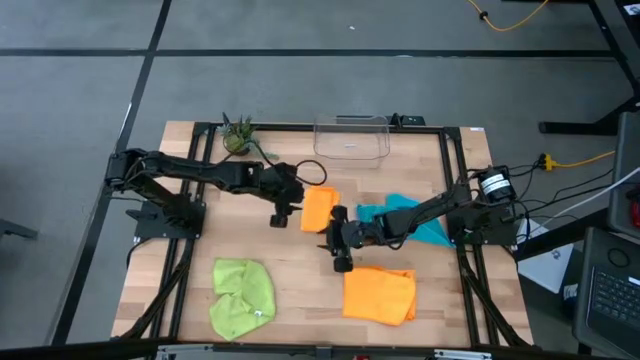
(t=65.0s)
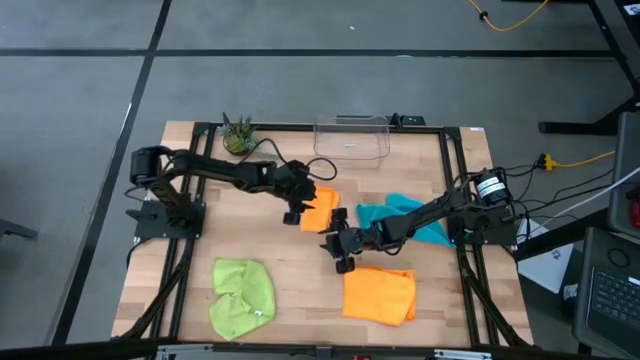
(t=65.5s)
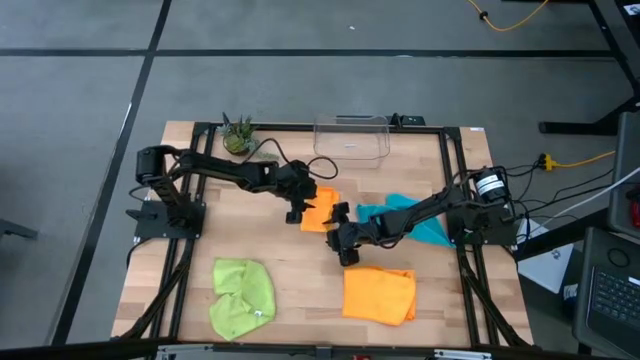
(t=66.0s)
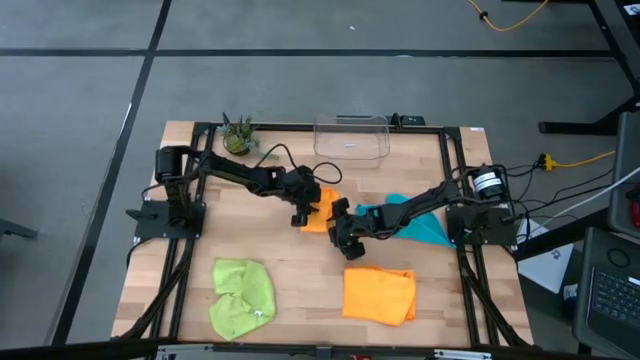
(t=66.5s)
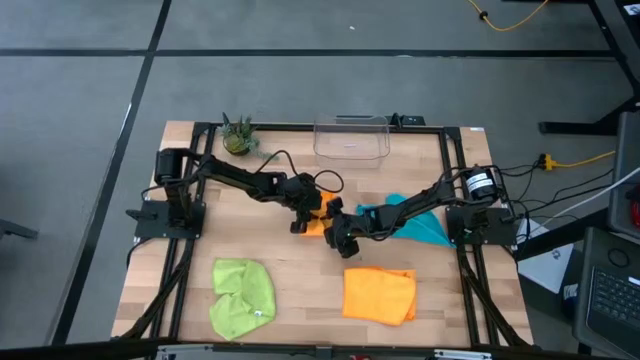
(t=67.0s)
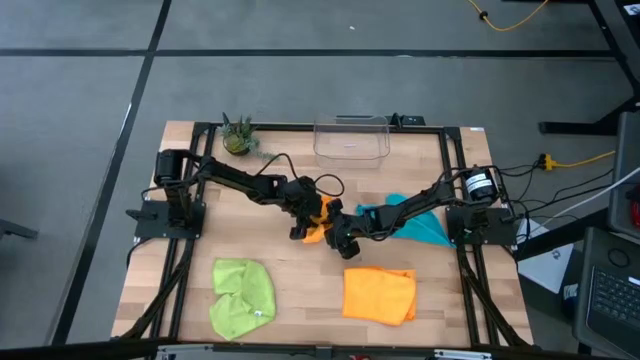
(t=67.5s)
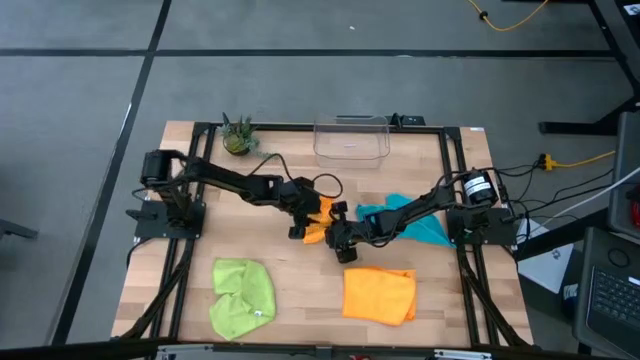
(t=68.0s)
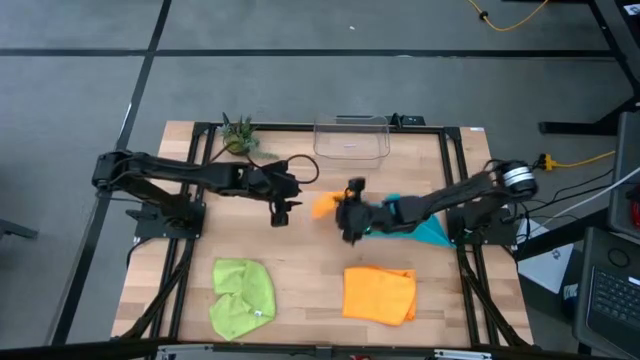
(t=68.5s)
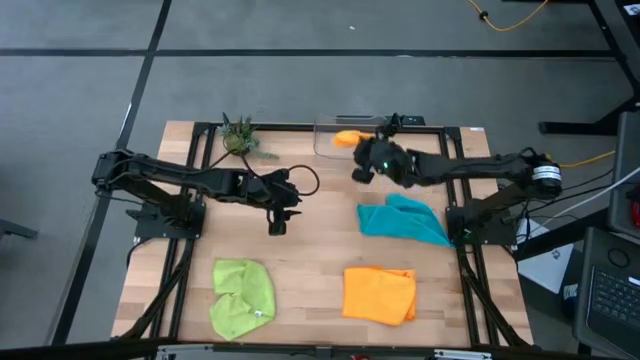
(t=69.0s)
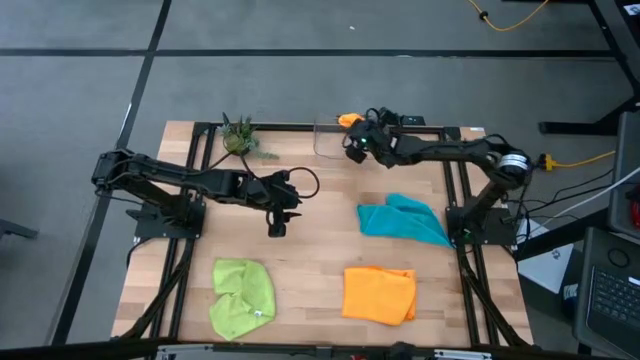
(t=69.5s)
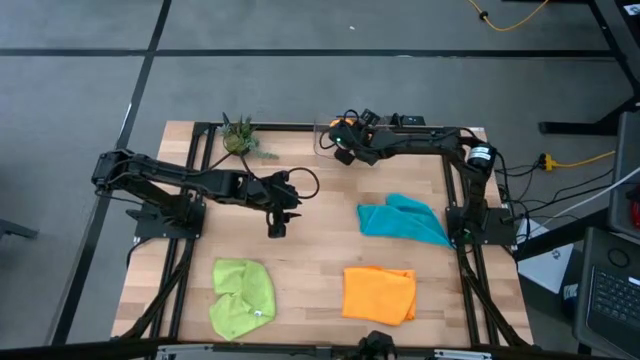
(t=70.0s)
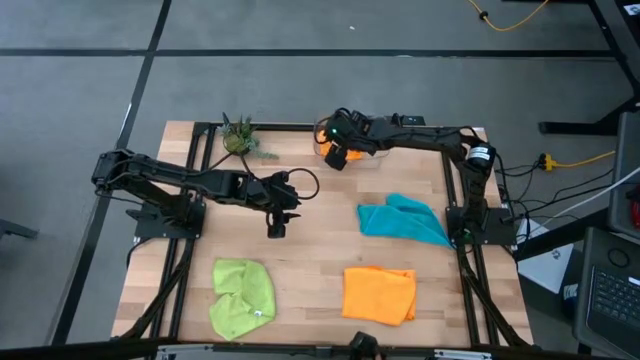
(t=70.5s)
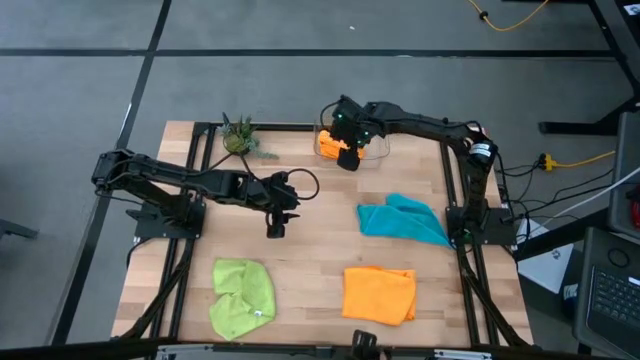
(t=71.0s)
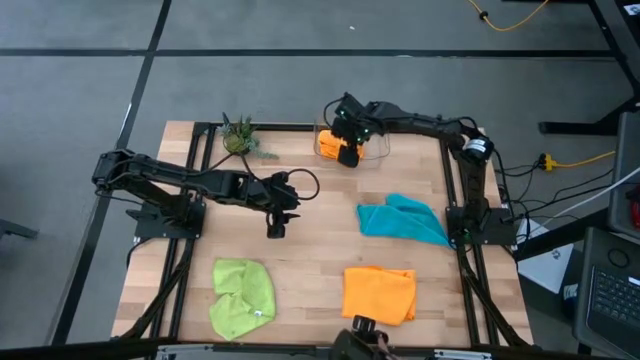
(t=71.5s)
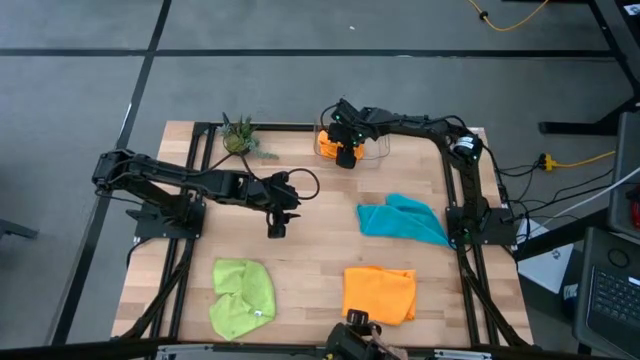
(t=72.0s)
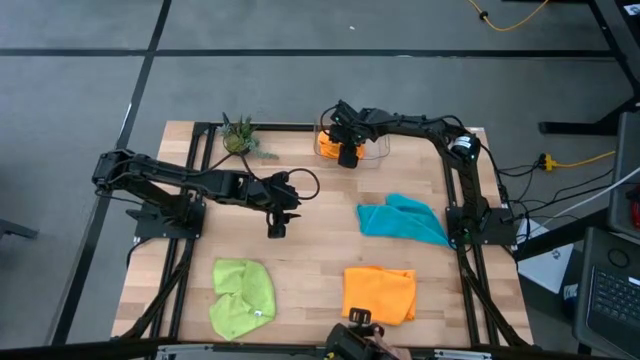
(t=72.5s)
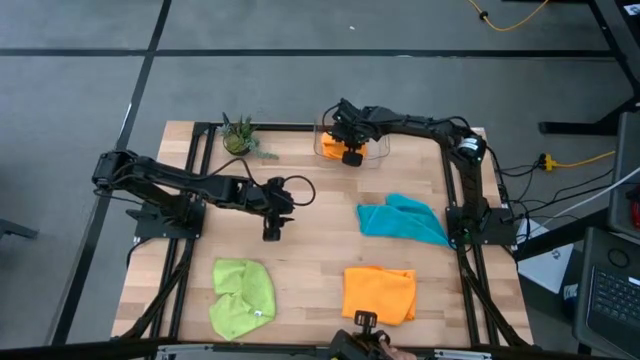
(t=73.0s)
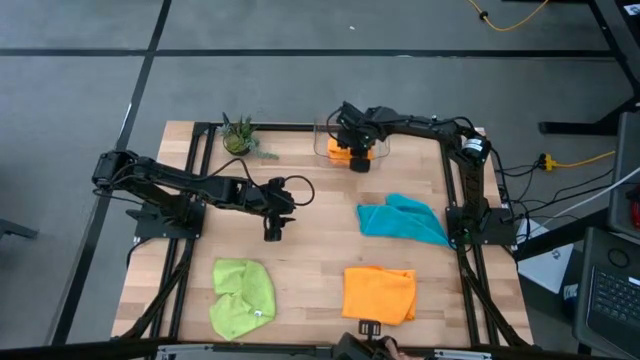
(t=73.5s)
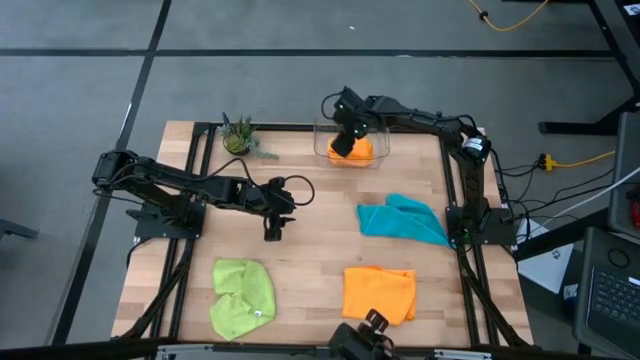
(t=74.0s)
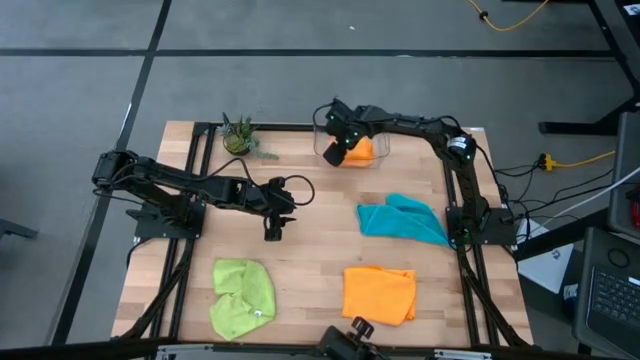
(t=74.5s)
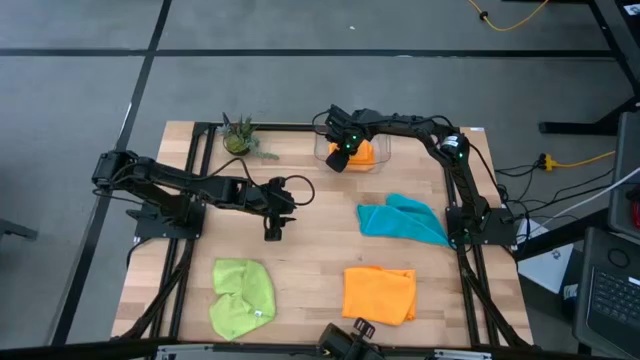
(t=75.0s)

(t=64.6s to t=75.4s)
Task: Fold microfiber towels
Put the top orange towel into the transparent bin

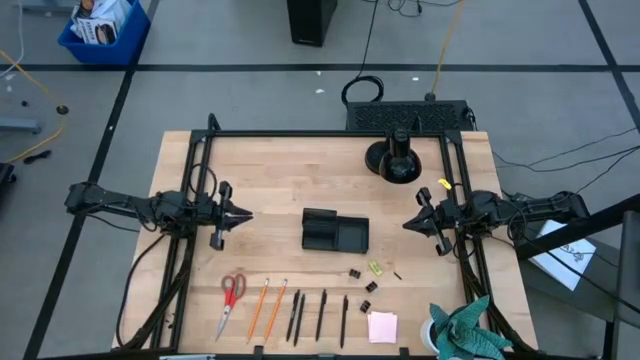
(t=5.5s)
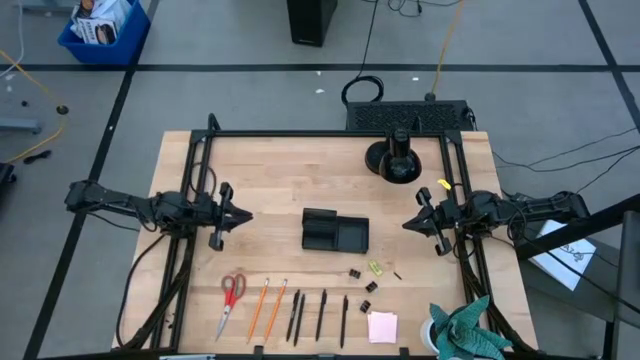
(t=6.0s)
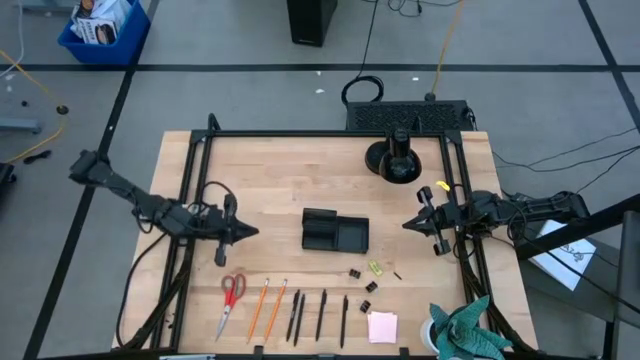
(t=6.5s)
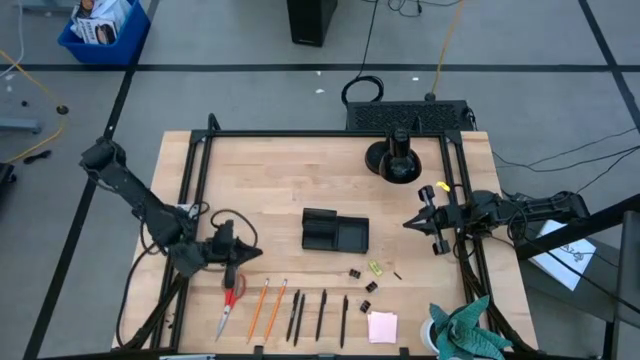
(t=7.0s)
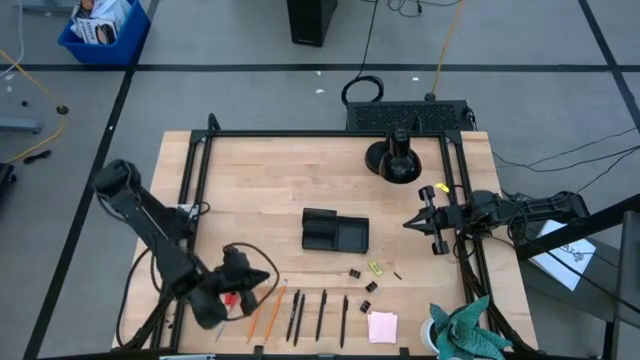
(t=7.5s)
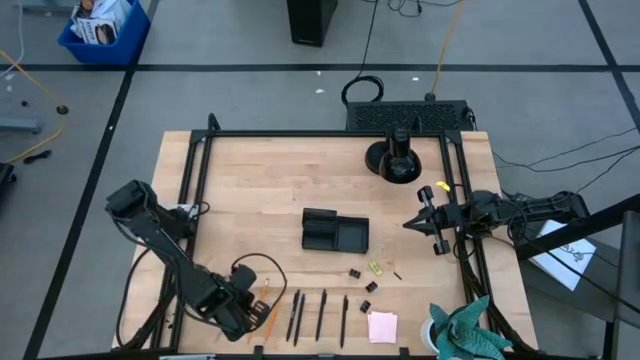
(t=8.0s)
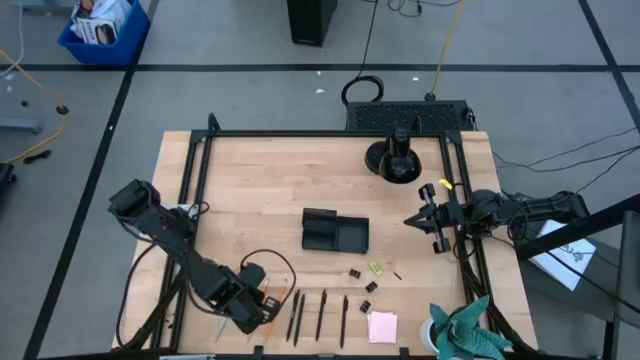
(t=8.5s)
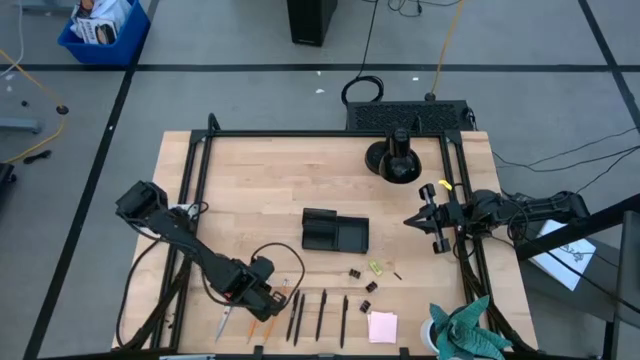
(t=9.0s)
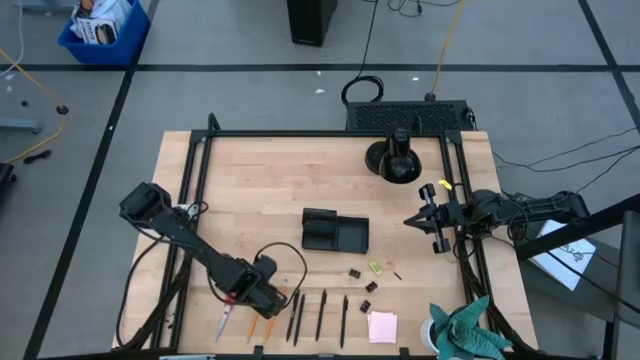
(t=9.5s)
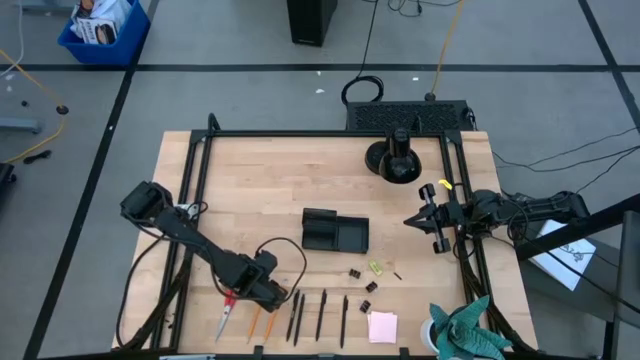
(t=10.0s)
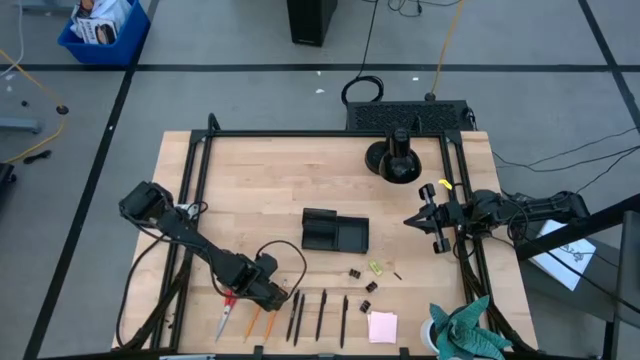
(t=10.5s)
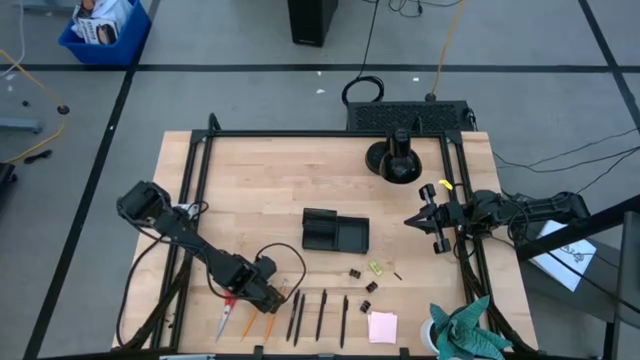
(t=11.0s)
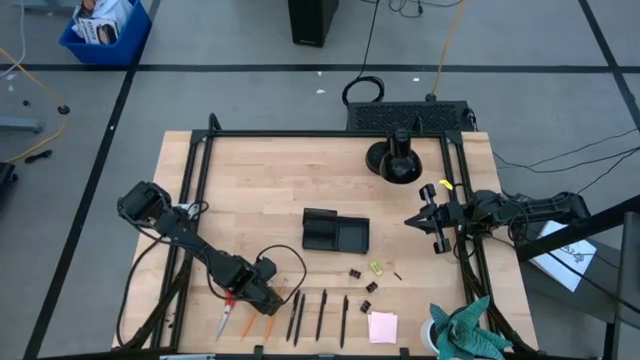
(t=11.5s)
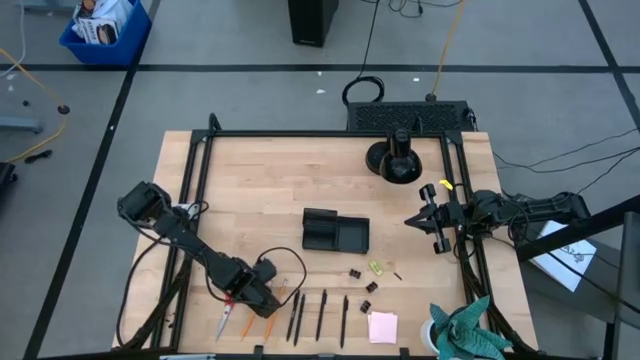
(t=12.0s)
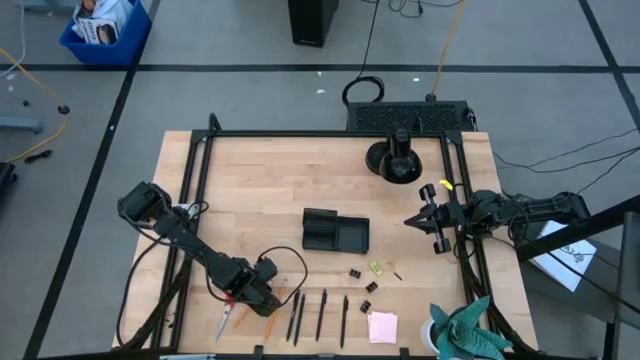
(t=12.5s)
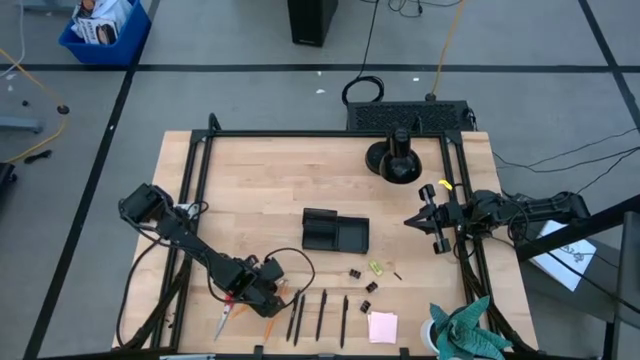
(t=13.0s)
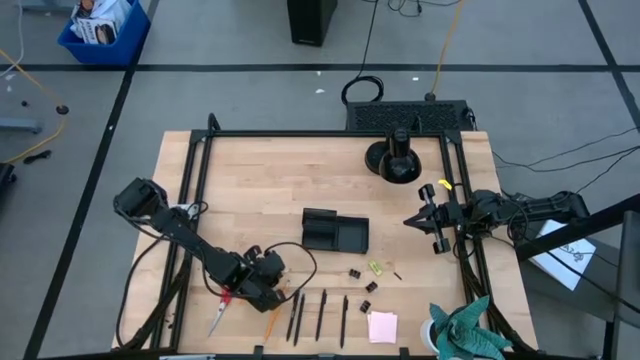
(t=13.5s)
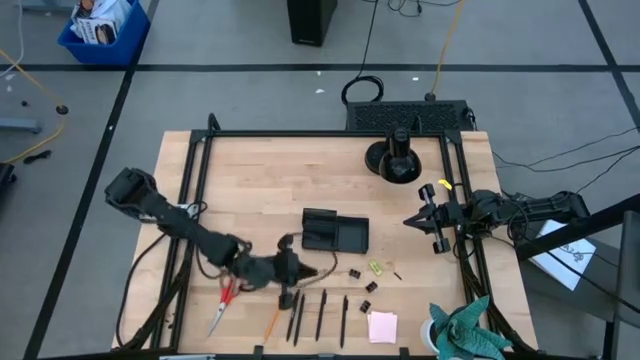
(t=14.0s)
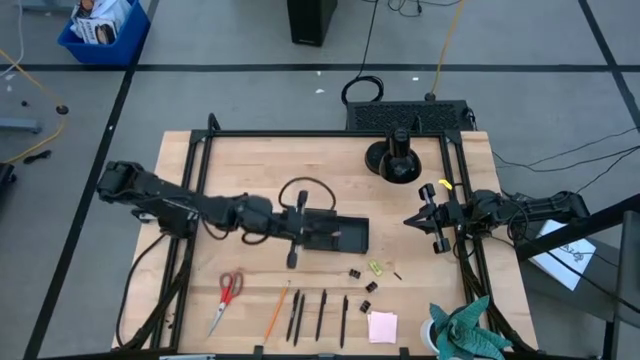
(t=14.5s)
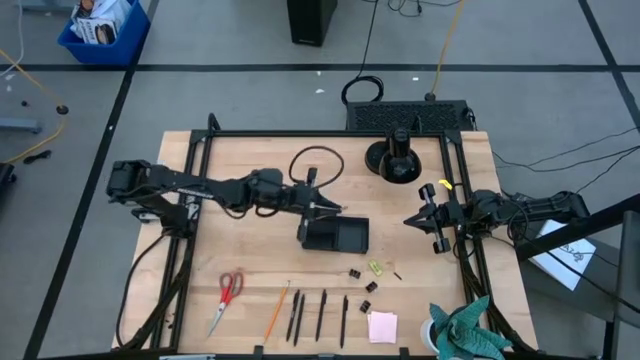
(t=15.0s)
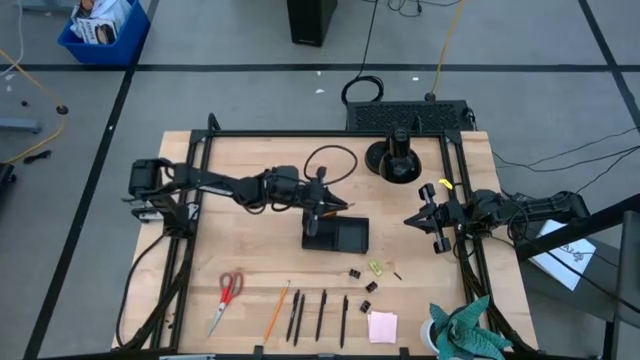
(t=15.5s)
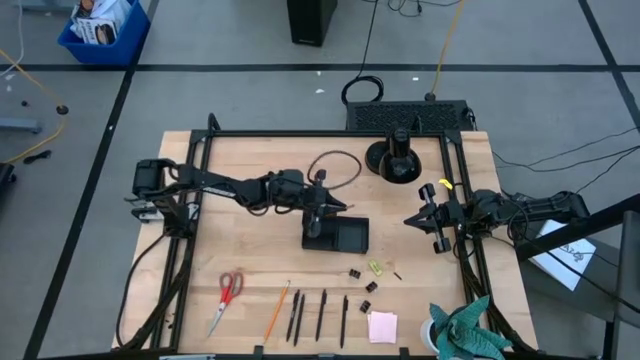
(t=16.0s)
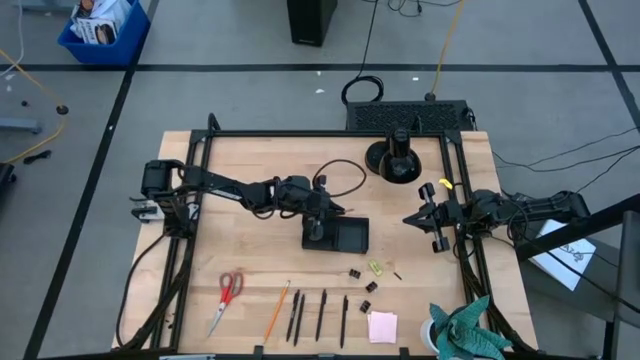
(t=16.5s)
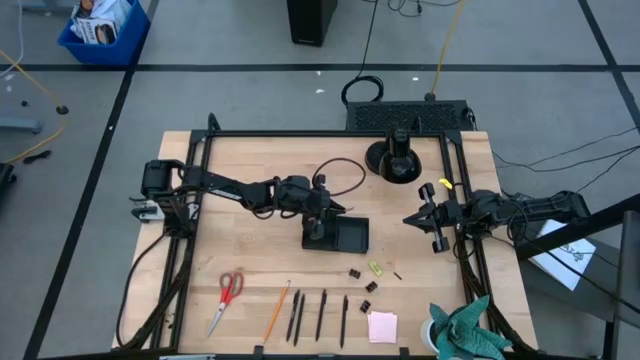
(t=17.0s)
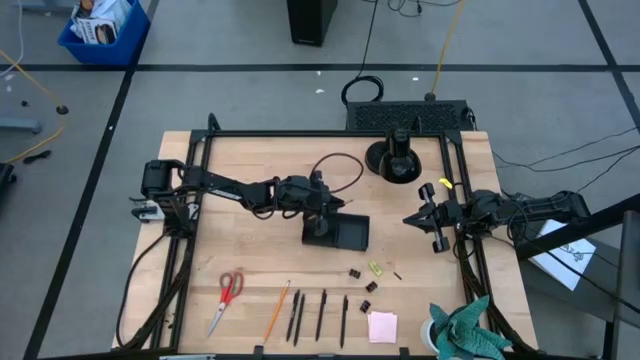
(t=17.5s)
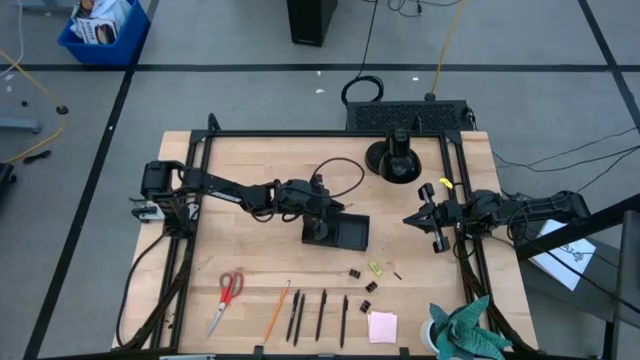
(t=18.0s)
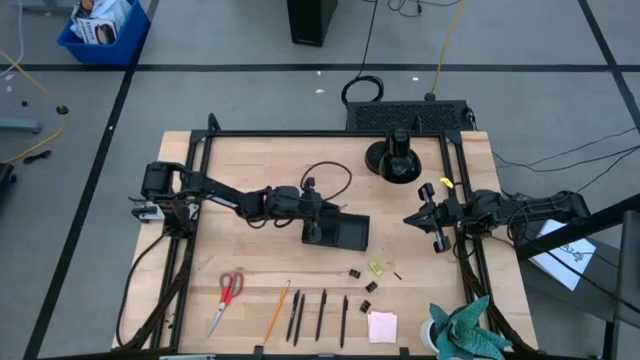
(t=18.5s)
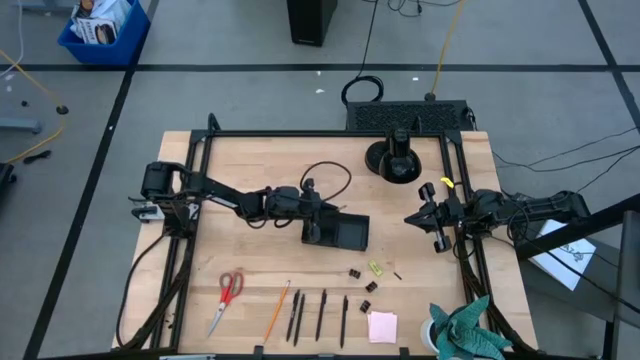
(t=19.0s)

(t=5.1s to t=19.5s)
Task: Pick and place office supplies into organizer
Put the yellow pencil into the black desk organizer
